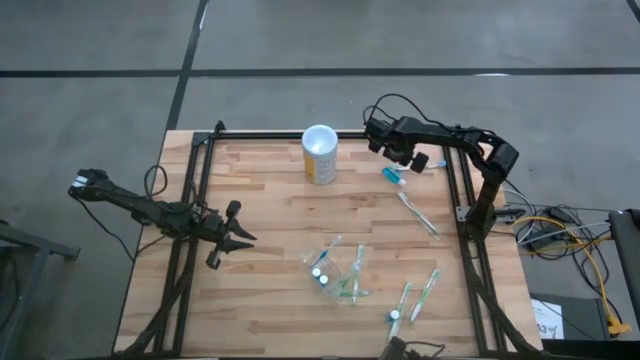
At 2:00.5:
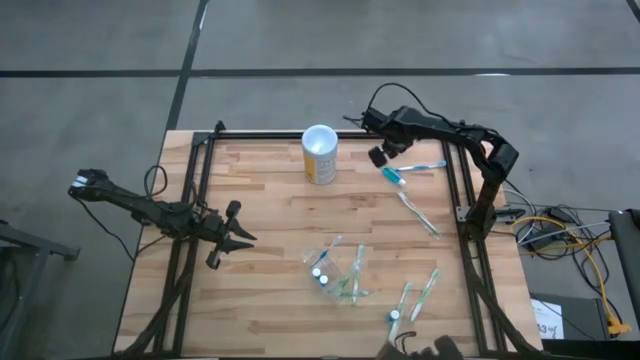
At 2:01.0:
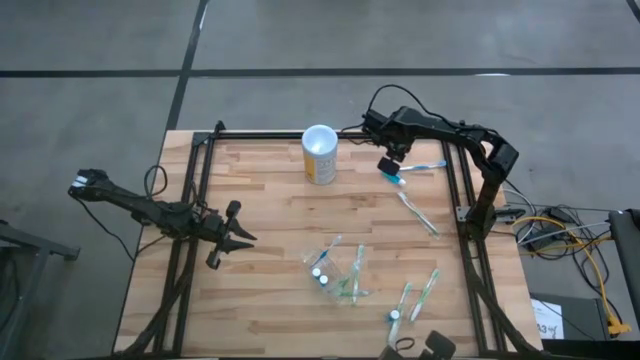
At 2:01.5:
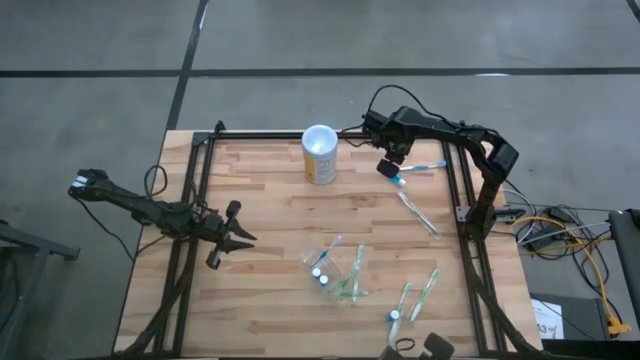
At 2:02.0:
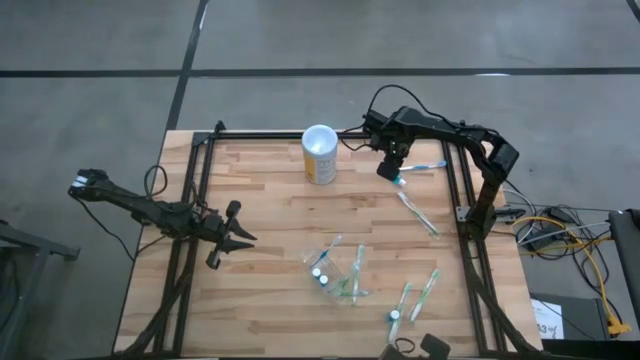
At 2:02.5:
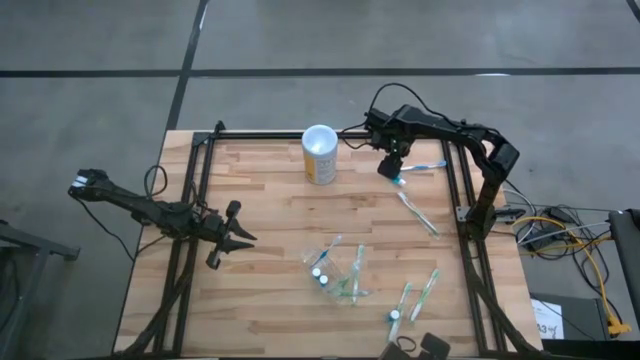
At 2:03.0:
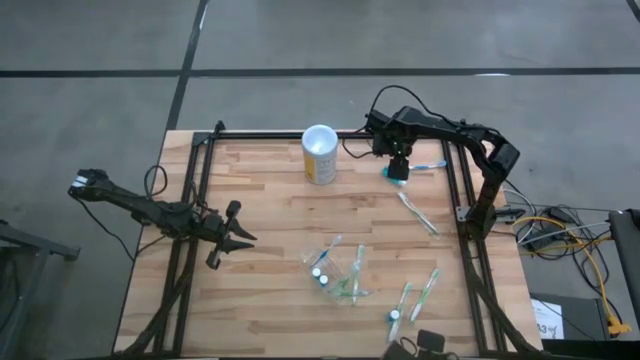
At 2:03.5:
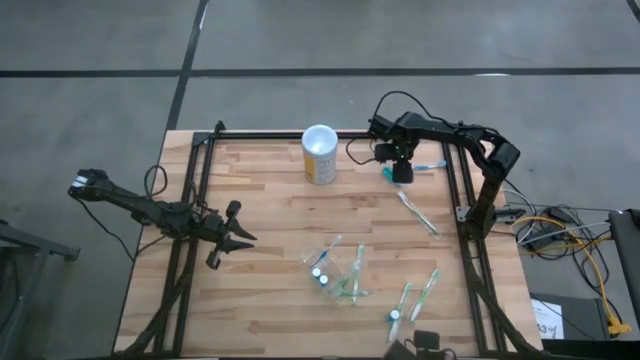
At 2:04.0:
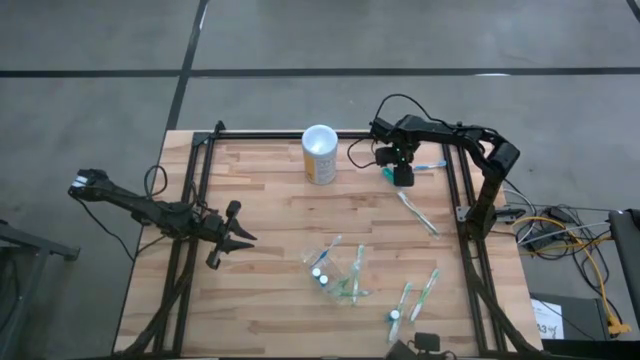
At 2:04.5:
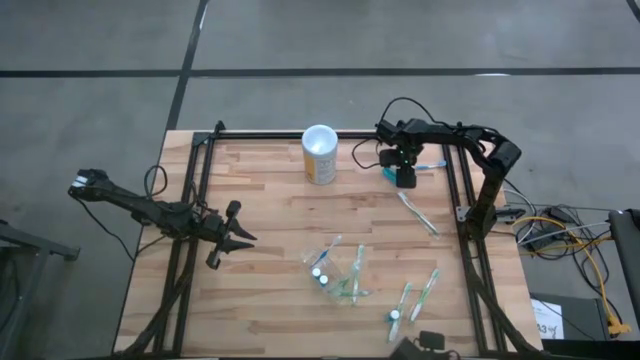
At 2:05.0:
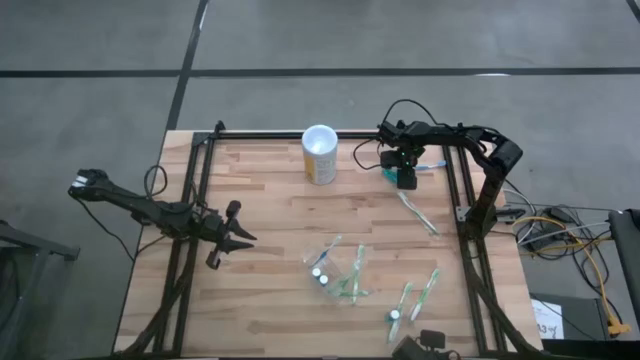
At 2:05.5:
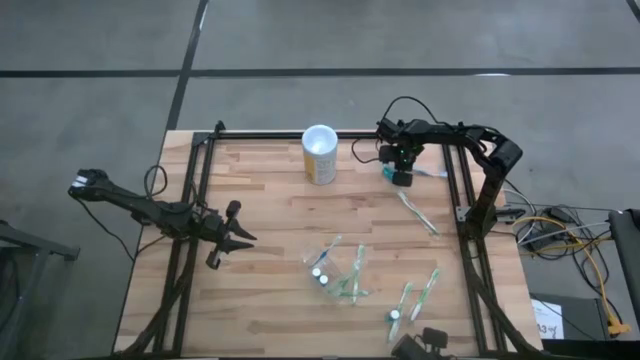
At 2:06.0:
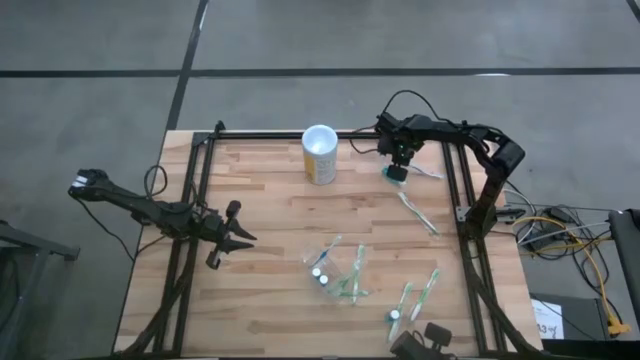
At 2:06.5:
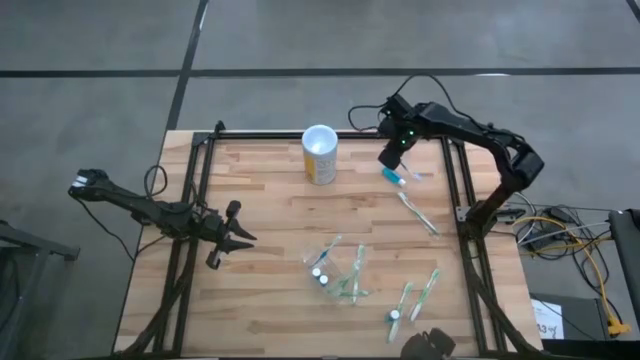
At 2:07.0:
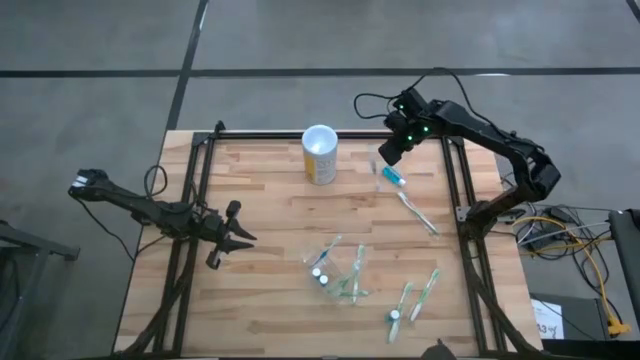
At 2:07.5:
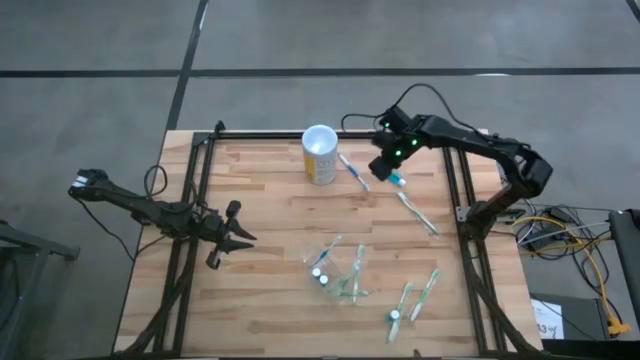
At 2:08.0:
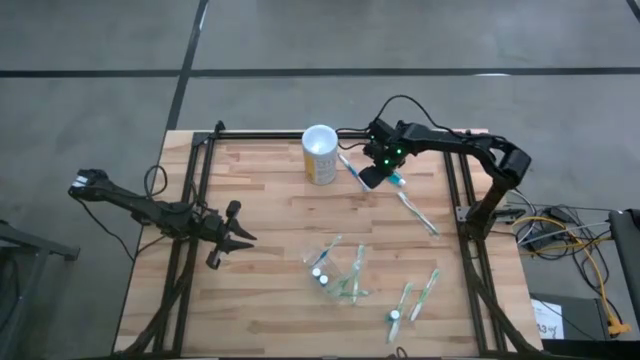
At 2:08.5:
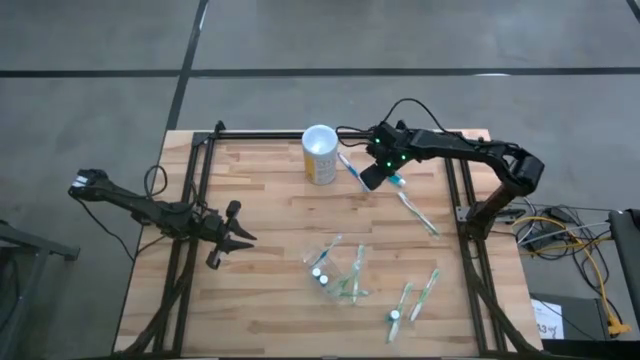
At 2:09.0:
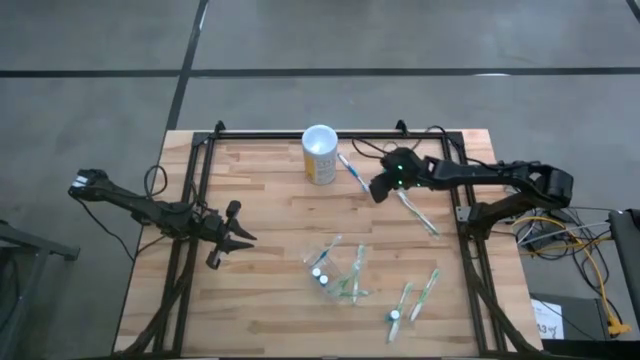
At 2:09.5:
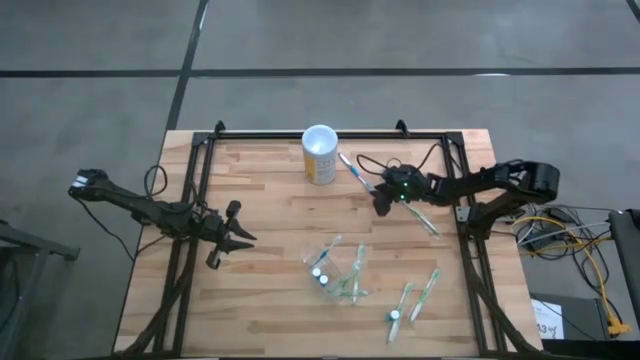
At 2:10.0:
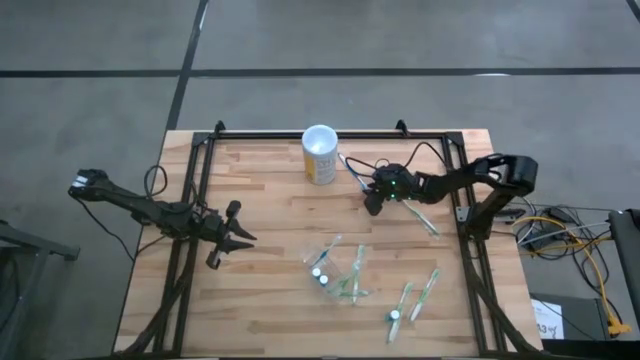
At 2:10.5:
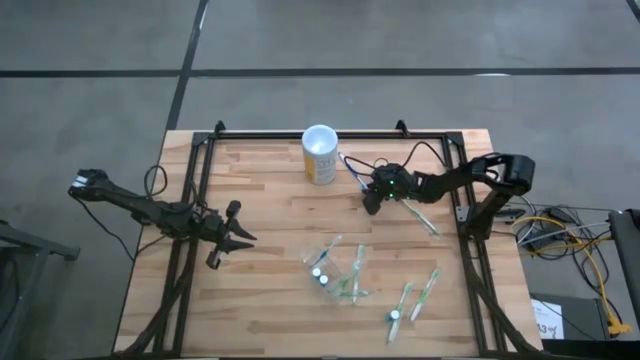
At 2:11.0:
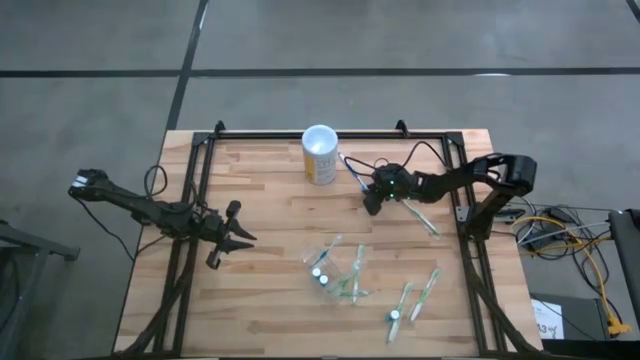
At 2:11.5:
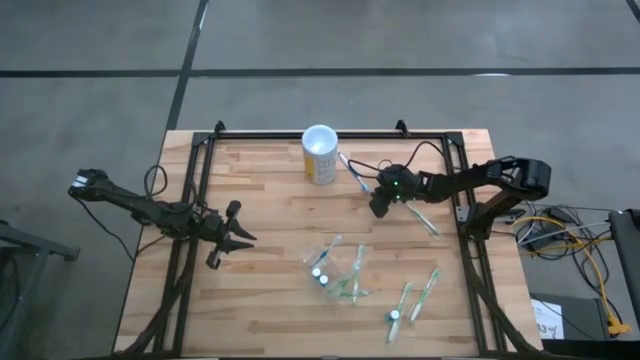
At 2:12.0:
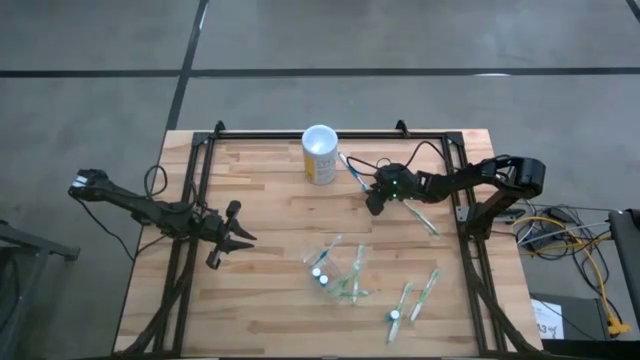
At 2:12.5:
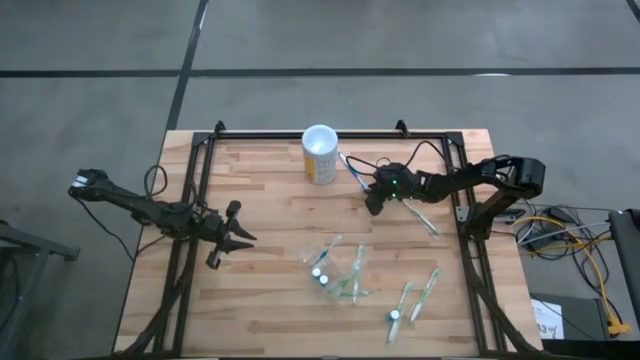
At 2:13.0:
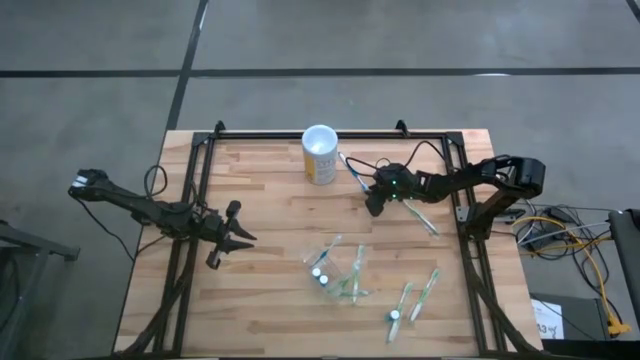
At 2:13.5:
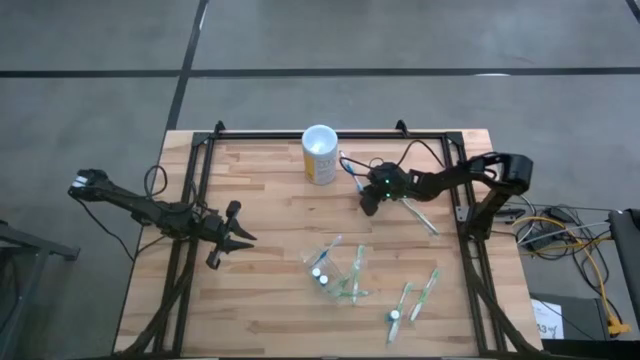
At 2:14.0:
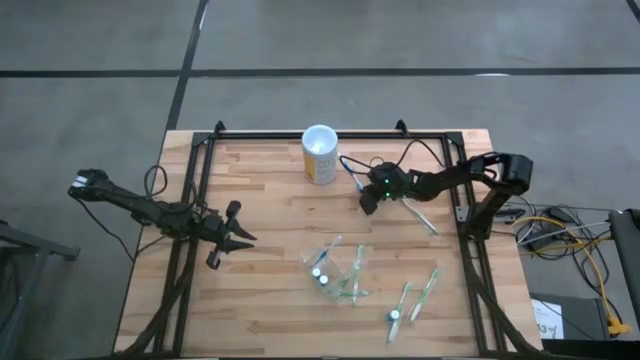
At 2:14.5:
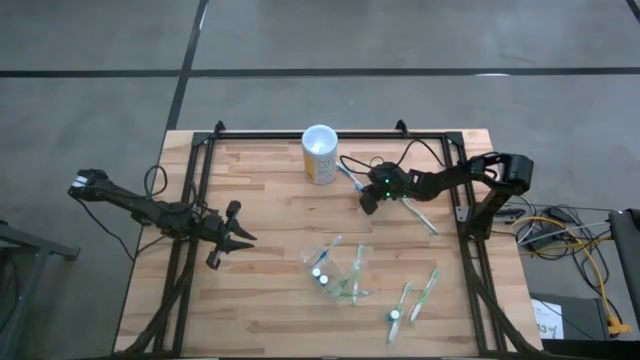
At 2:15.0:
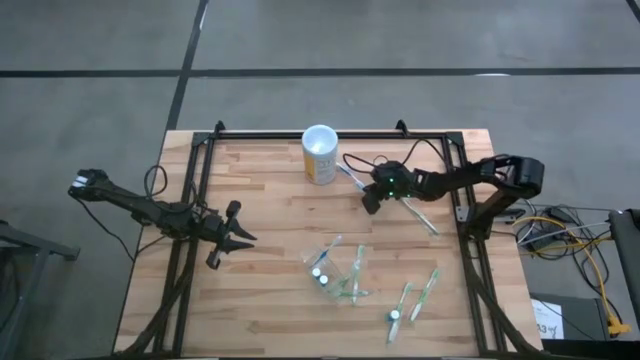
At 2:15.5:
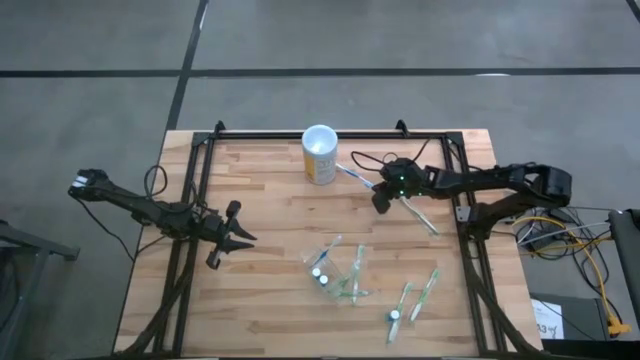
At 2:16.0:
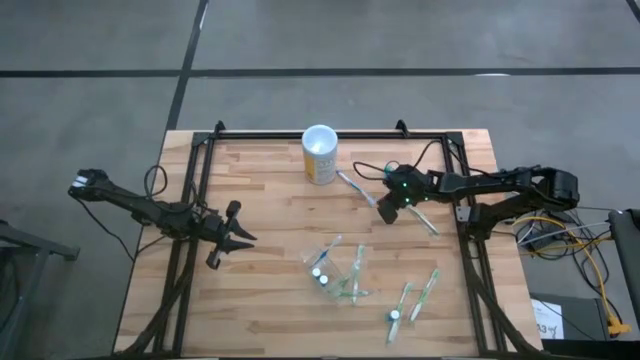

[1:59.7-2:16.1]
Task: Pick & Place toothbrushing station
Put the blue toothbrush into the left section of the transparent organizer

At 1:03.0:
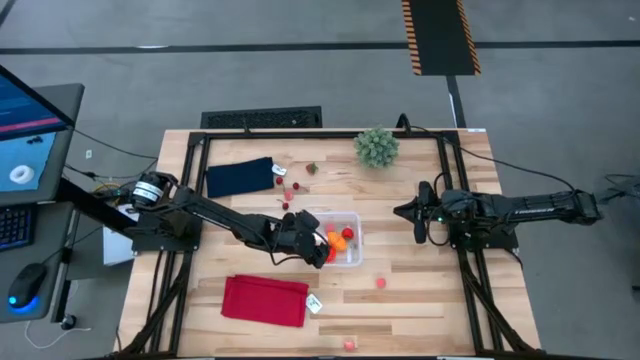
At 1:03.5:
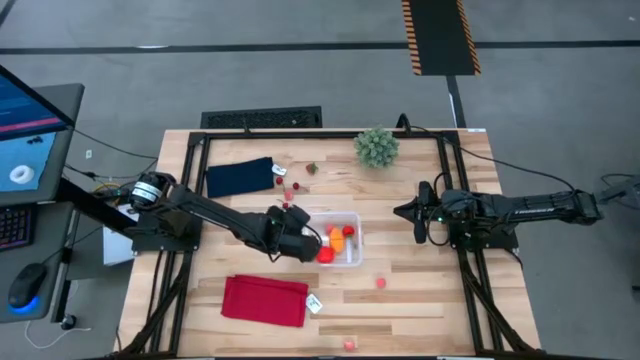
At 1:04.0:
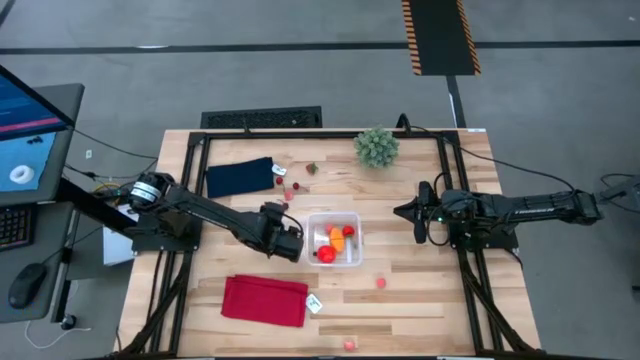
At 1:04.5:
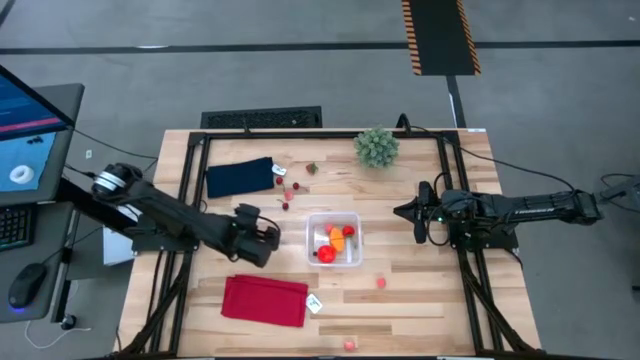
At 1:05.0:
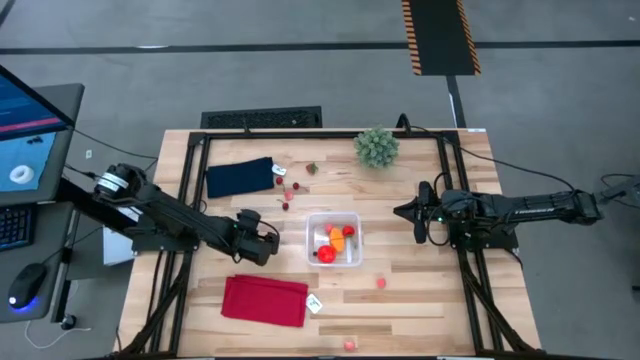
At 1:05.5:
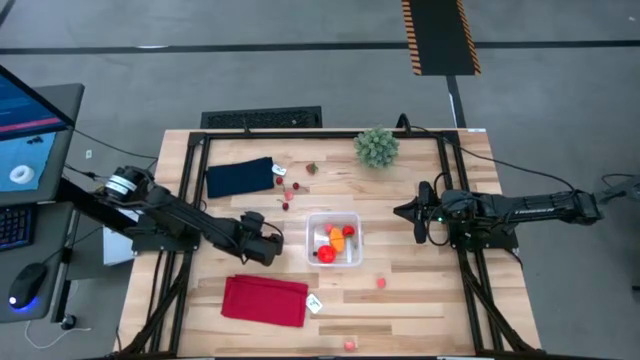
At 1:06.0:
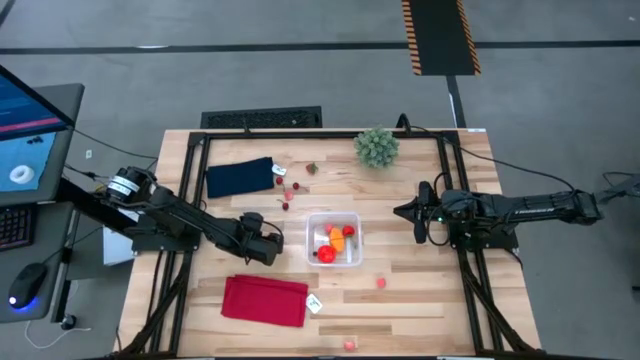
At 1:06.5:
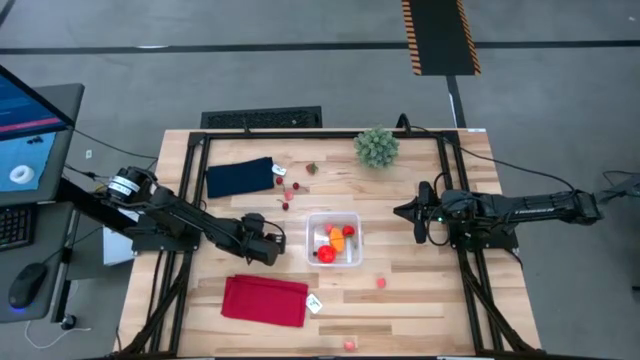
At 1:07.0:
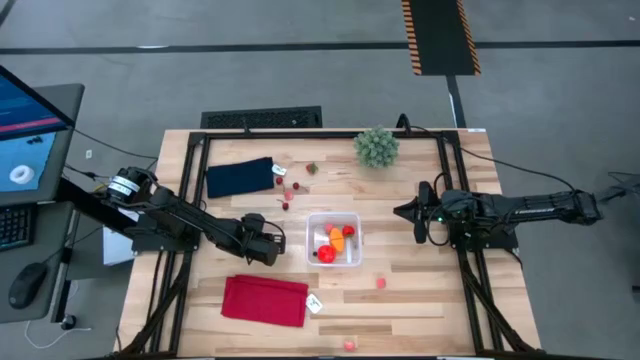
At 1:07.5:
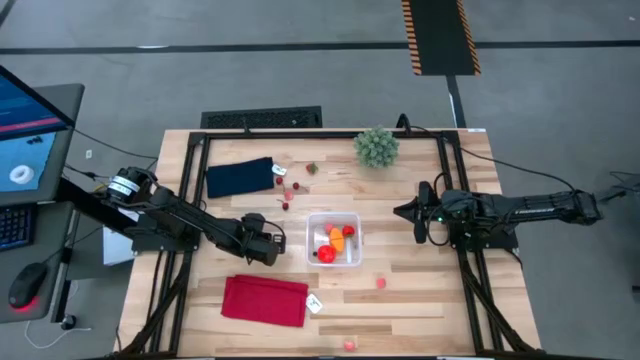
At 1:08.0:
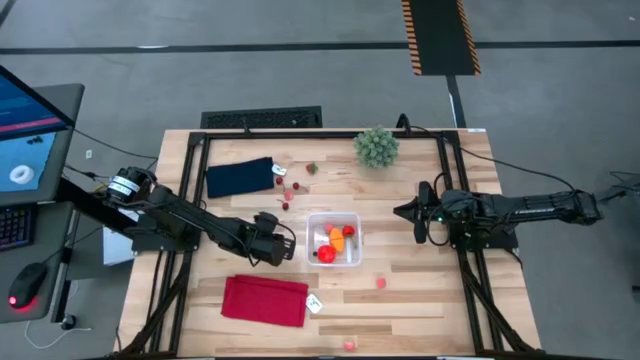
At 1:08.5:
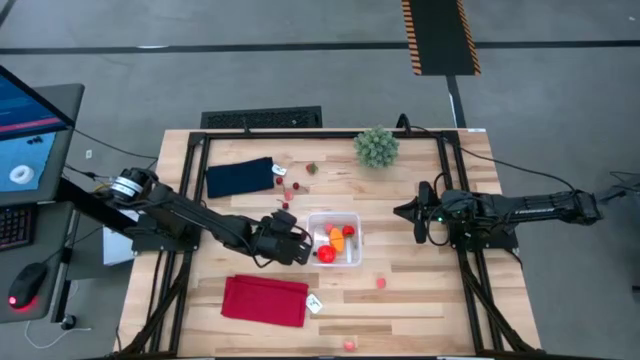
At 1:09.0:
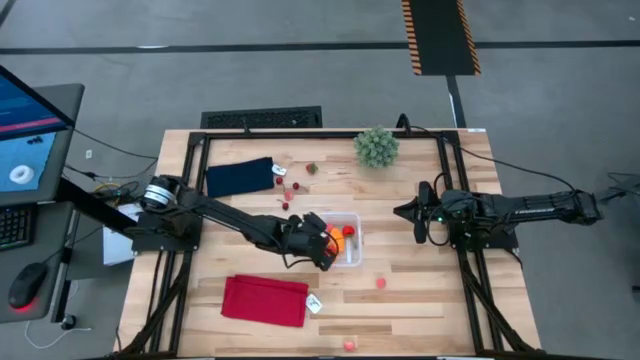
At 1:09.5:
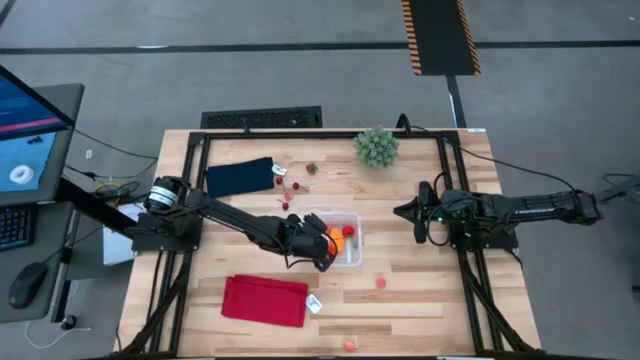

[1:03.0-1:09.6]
Task: Pick and placing Produce into tupperware
Put the red cherry into the transparent bin
